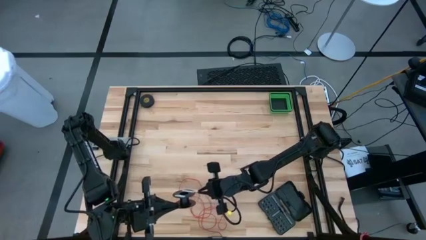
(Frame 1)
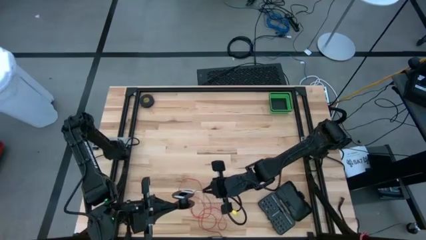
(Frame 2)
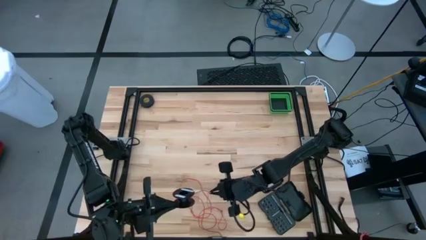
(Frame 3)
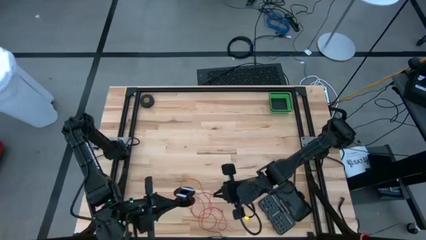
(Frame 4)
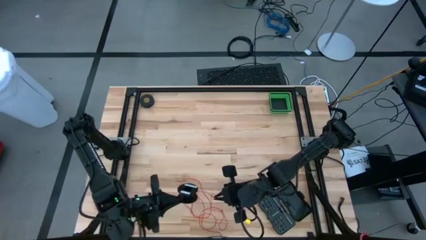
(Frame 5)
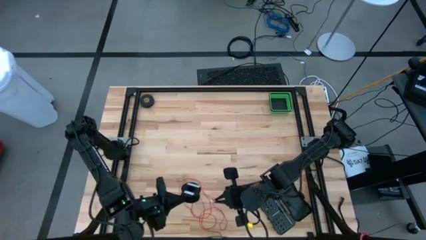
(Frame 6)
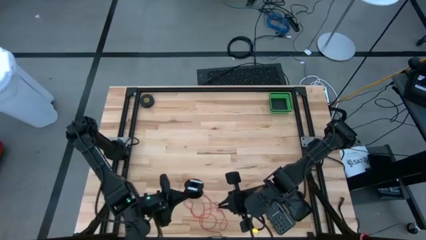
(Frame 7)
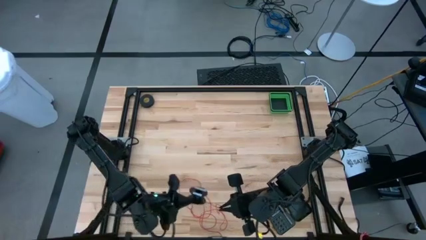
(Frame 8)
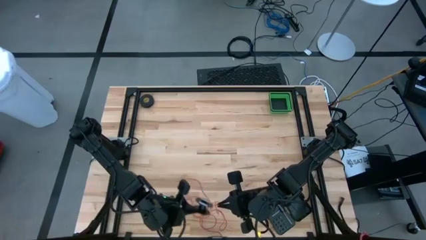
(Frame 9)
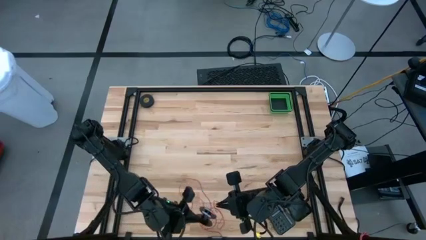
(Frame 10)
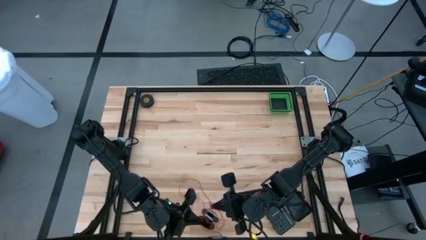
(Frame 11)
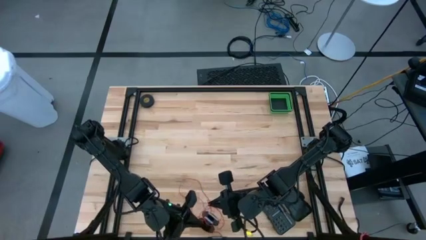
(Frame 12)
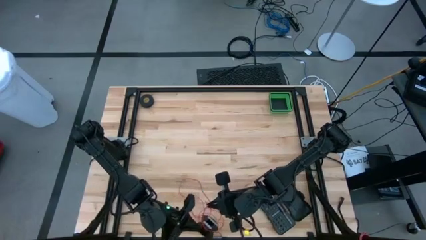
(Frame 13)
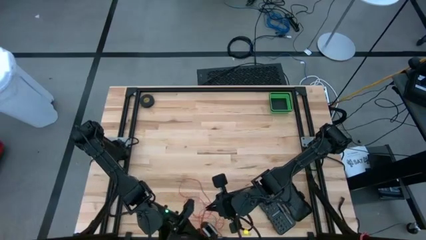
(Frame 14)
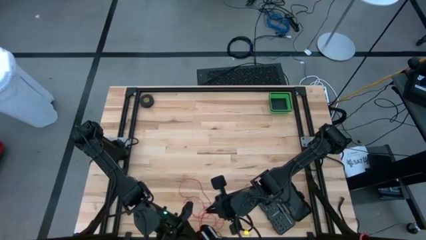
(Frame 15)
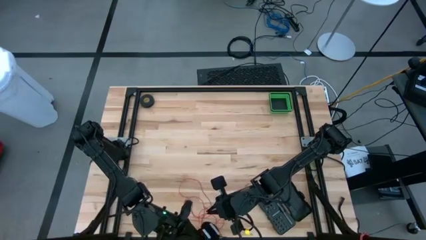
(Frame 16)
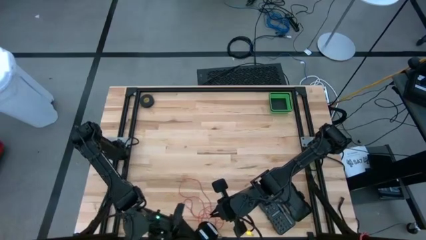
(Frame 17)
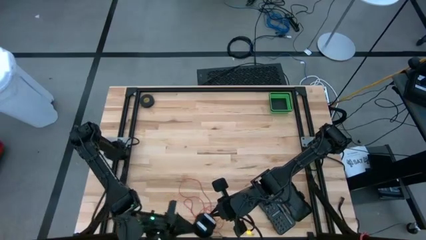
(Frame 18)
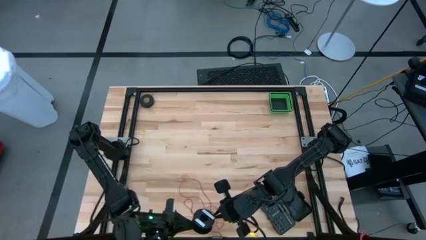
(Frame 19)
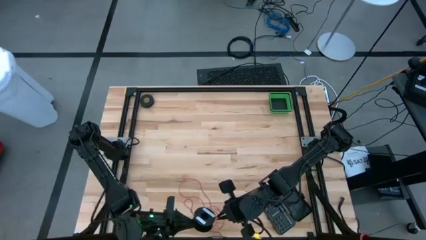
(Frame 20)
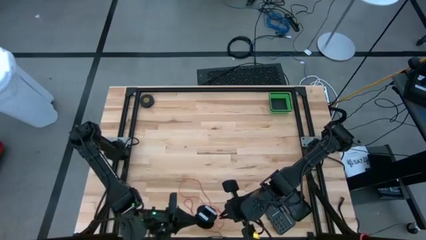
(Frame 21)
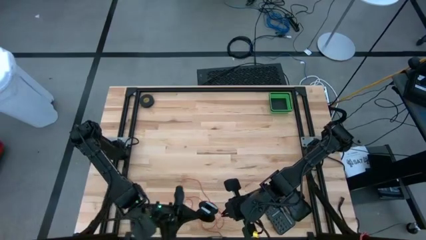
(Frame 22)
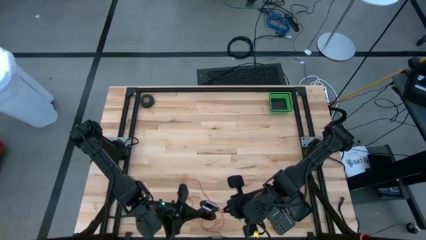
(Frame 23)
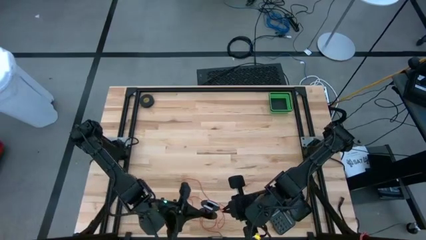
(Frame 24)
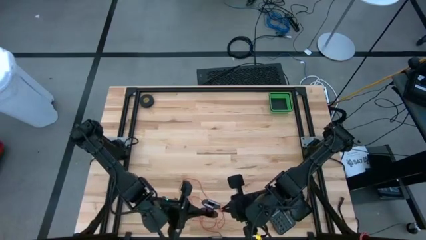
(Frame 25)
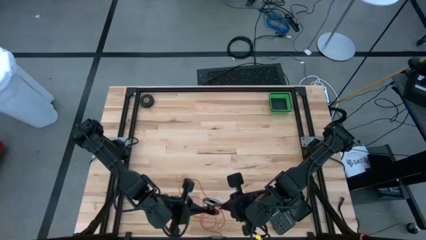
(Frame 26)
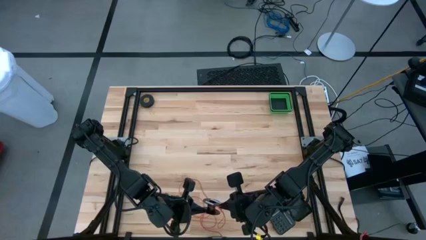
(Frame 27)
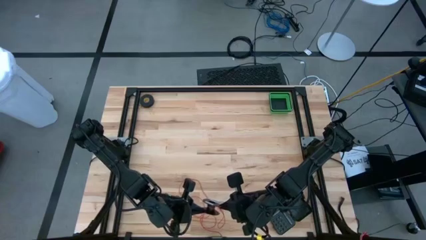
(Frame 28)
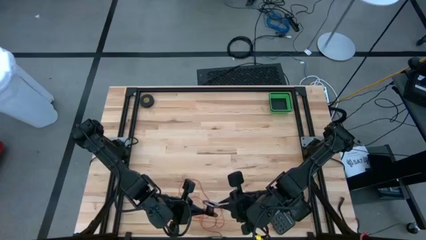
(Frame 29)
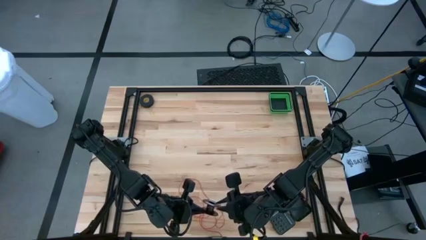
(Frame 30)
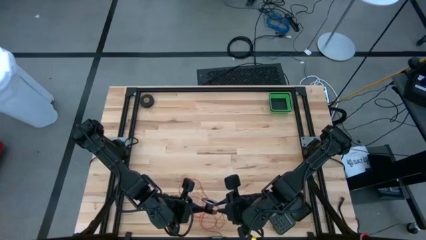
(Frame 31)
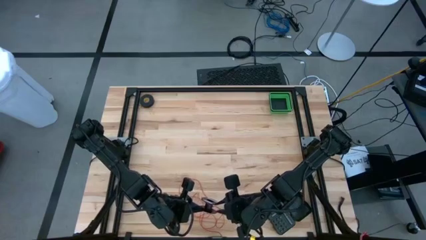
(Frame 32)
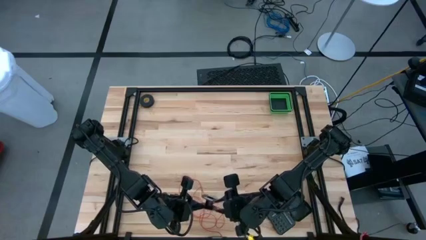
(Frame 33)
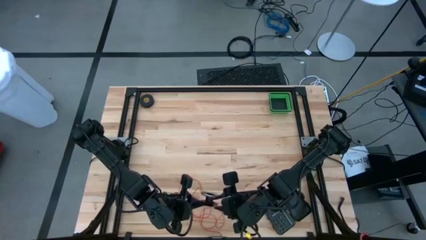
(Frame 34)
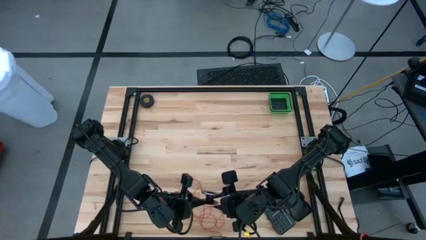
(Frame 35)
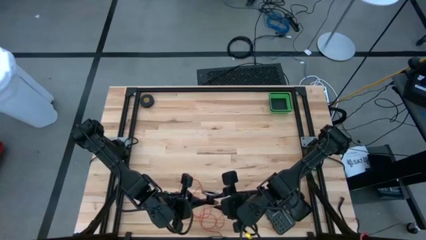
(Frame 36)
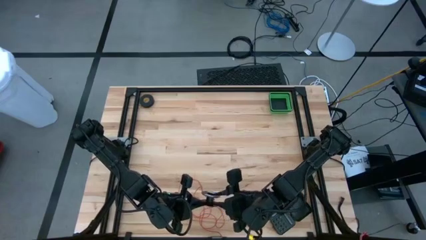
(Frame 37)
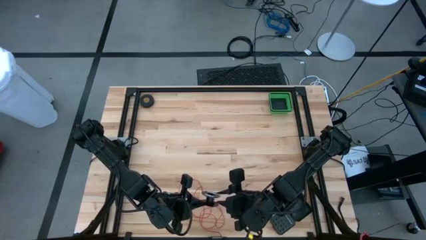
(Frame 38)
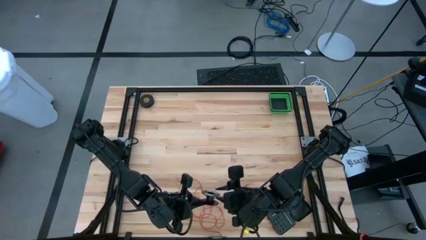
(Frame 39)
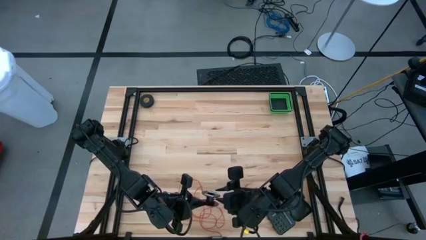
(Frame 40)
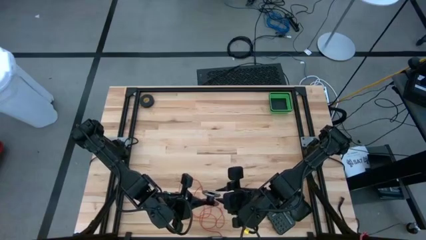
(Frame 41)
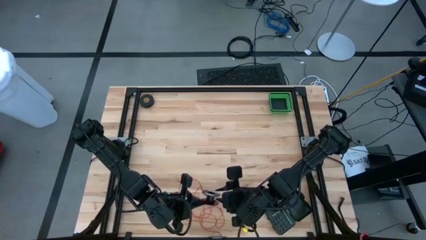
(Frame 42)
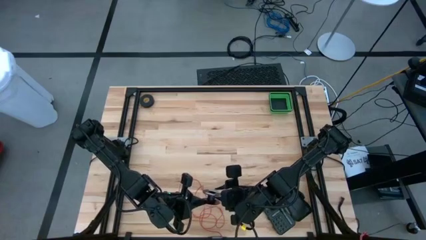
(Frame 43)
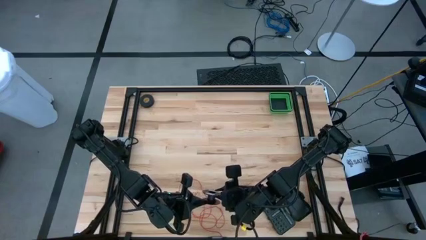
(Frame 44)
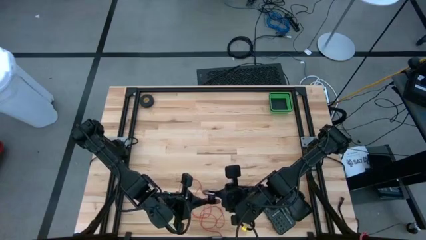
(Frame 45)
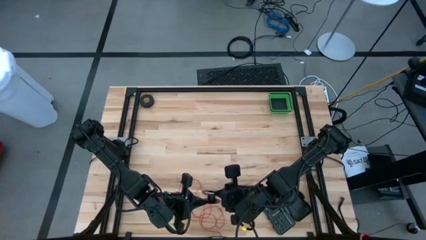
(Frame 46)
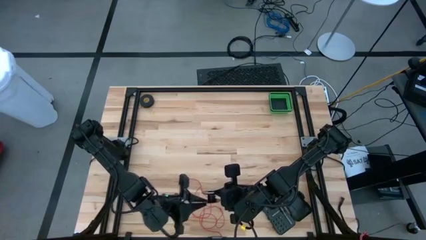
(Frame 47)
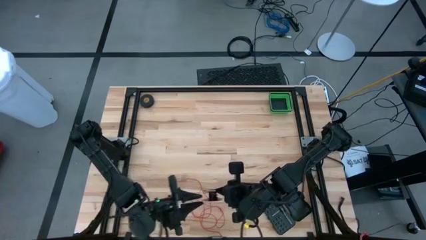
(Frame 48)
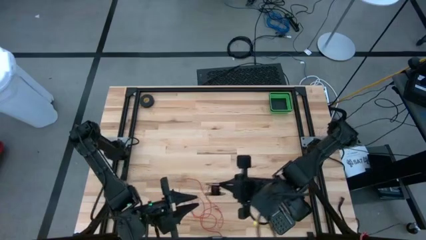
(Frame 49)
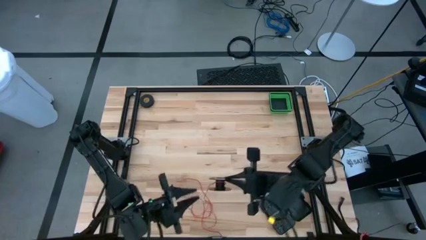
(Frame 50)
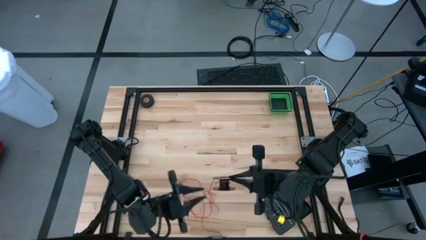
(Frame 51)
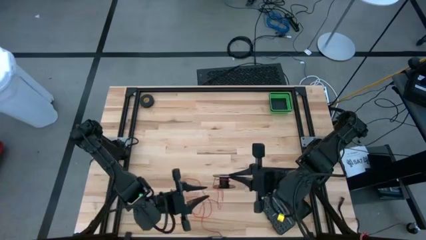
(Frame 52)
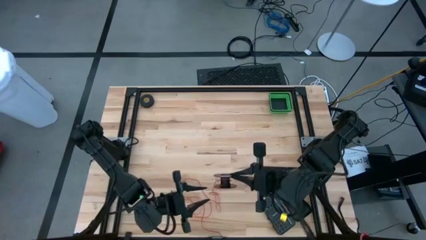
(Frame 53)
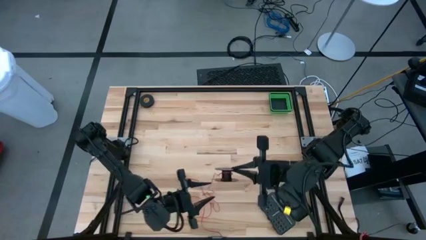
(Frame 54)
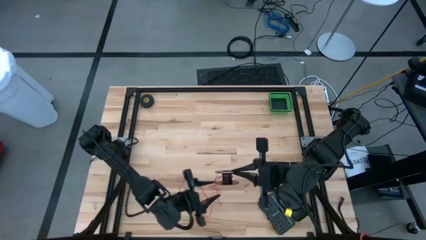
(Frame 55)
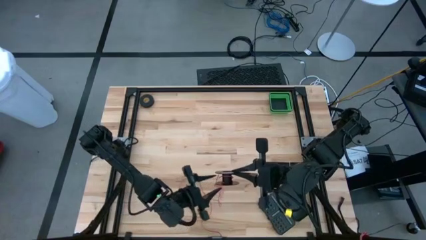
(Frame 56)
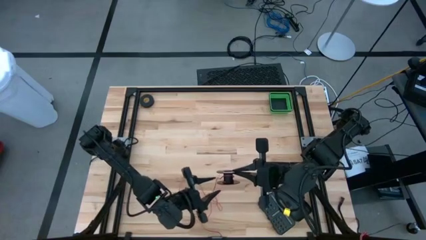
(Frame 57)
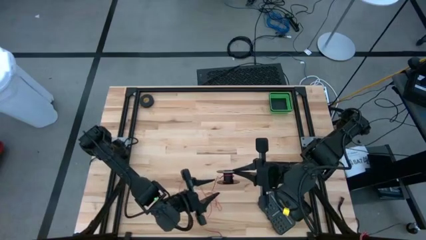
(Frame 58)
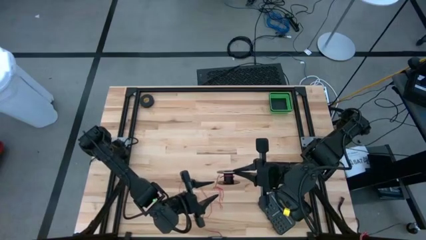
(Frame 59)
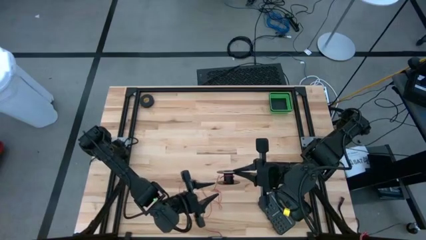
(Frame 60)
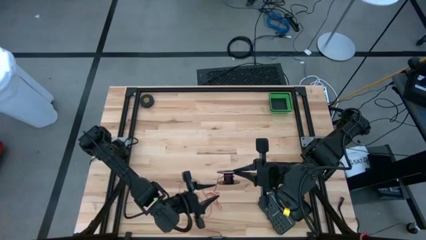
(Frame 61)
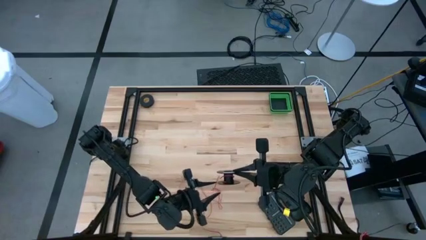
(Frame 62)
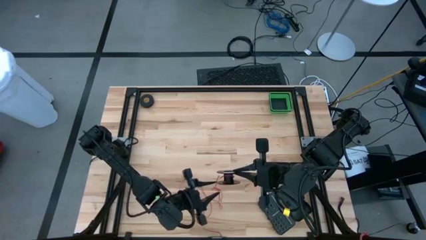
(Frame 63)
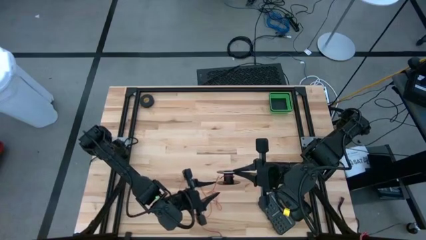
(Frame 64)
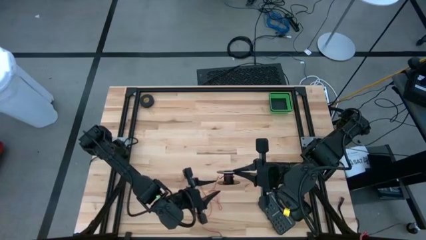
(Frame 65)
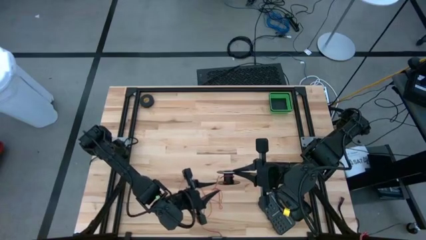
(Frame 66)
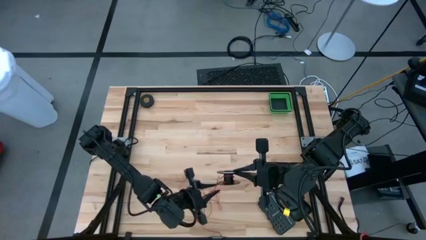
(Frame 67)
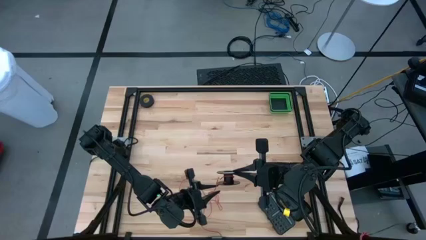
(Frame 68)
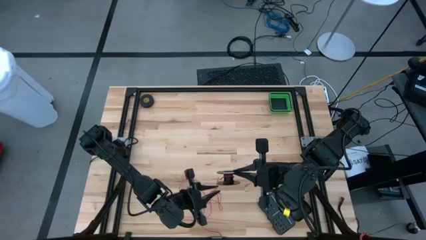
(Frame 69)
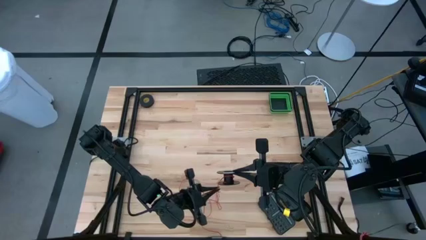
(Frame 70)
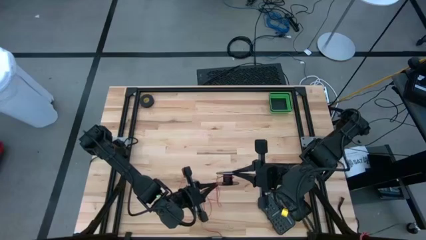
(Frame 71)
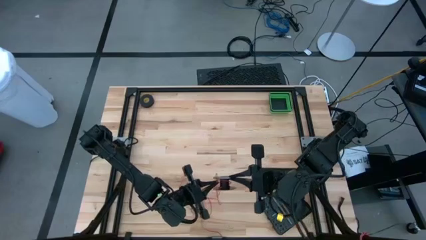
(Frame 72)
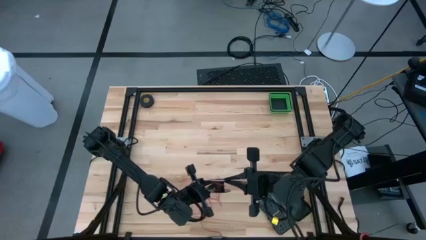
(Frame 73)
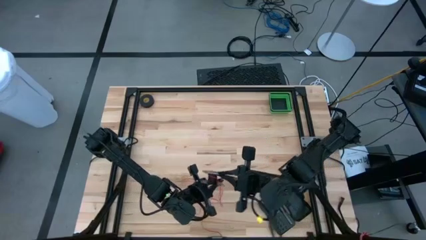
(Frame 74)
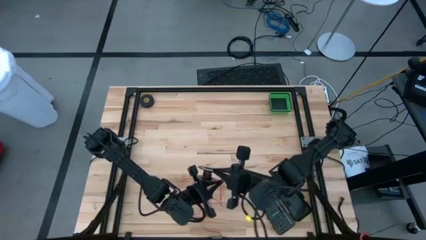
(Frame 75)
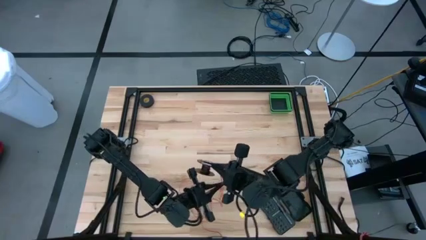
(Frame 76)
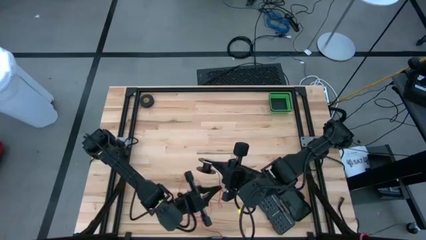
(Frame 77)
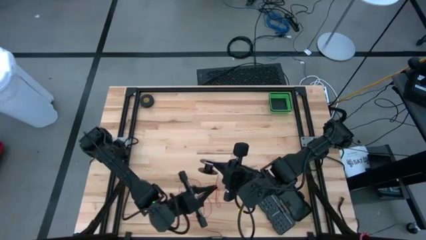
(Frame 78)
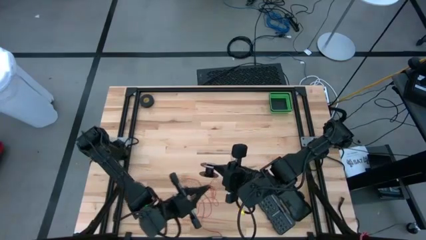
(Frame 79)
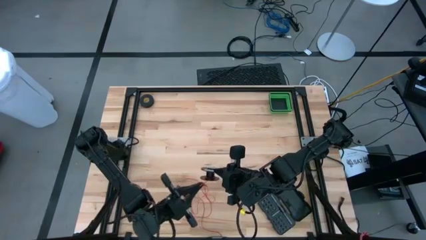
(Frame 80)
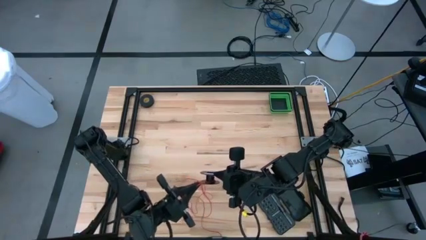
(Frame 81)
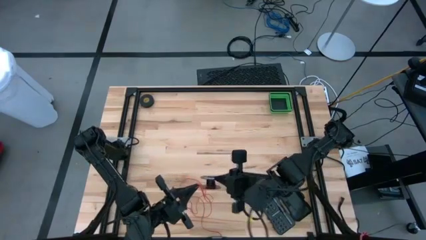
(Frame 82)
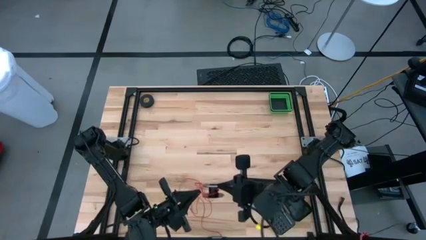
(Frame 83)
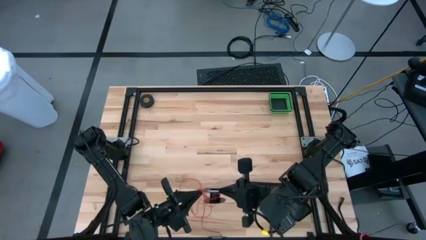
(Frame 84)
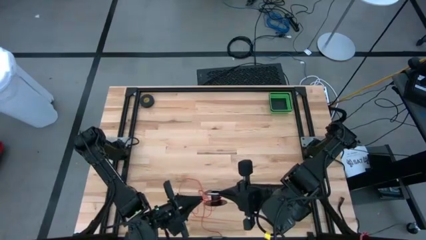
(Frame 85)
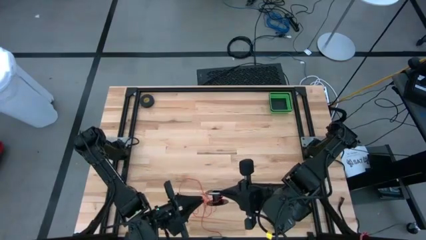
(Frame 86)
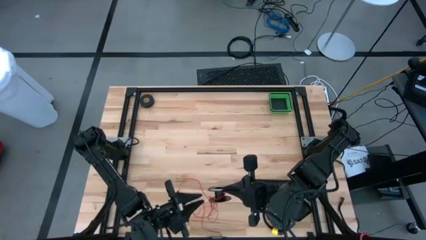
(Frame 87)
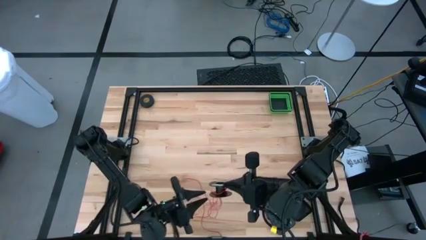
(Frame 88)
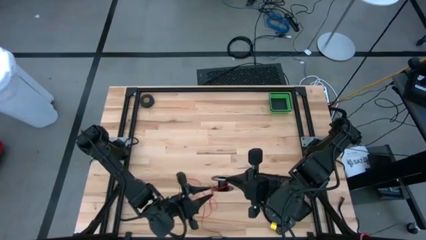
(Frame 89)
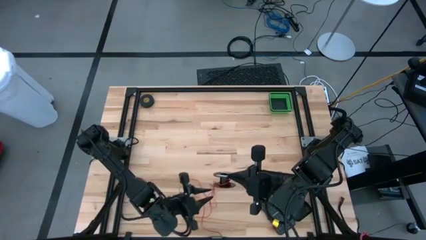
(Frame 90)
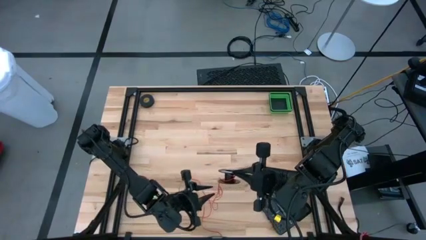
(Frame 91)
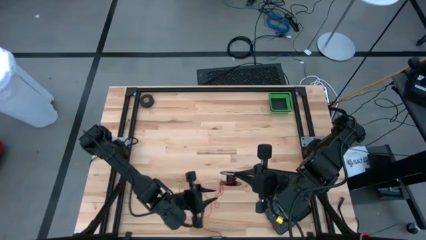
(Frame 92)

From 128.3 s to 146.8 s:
Task: Coil cords
Coil the red wire on the black spool
